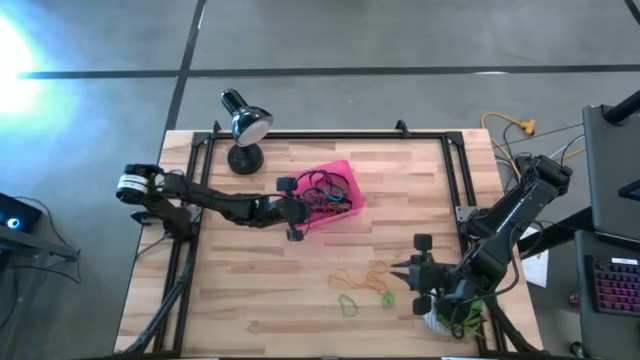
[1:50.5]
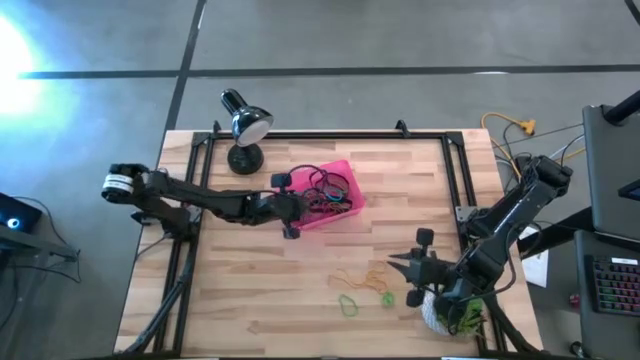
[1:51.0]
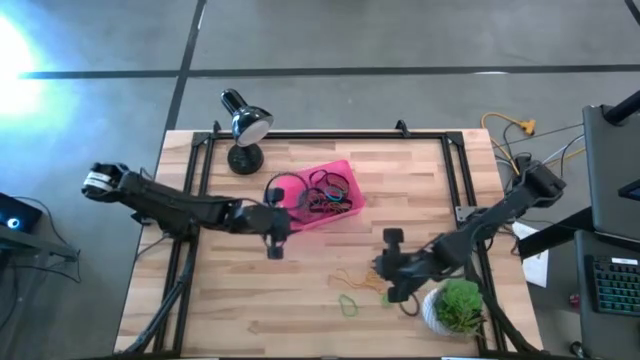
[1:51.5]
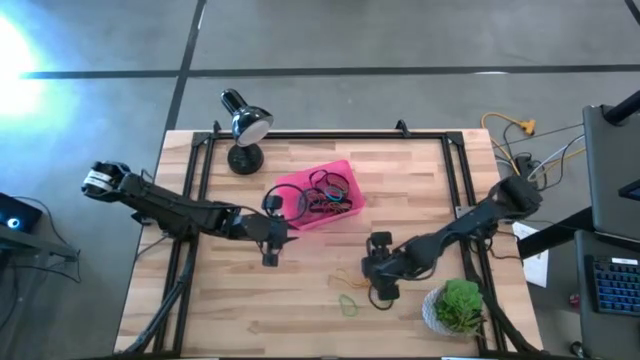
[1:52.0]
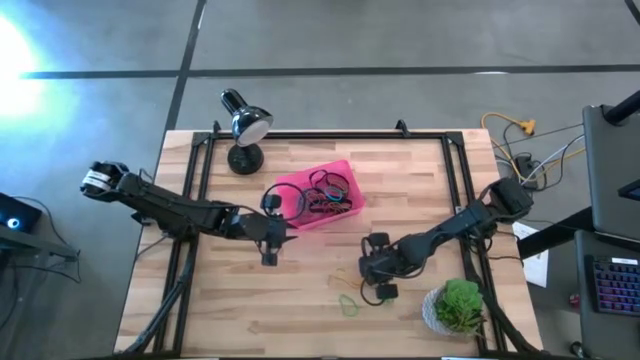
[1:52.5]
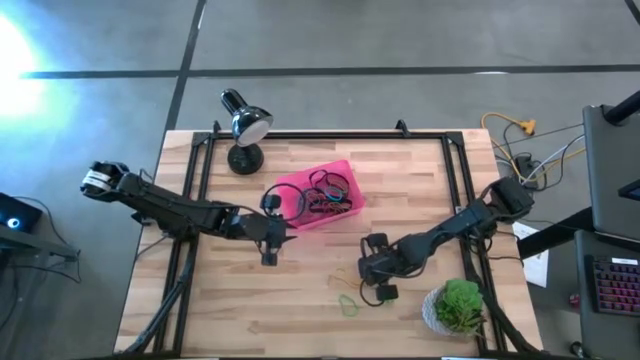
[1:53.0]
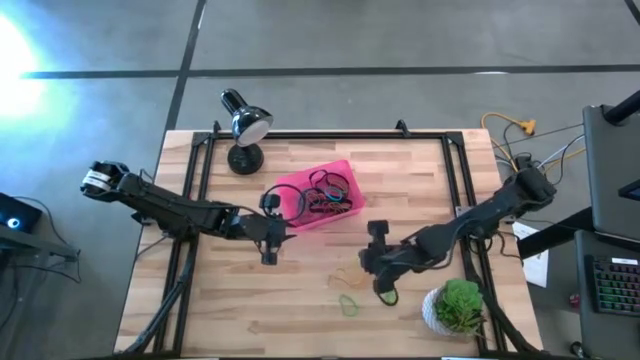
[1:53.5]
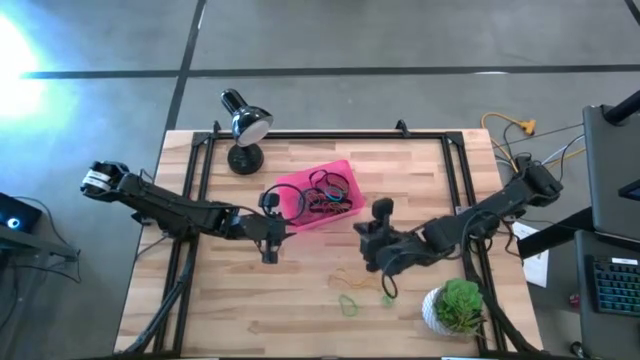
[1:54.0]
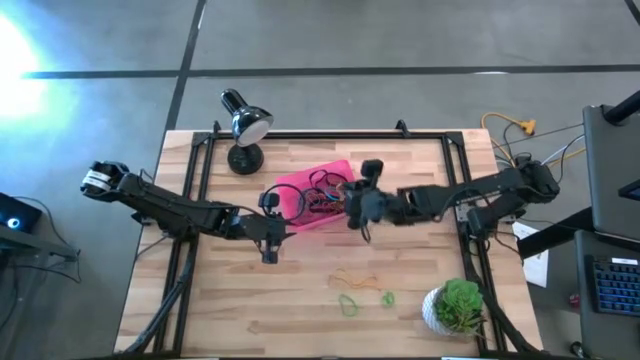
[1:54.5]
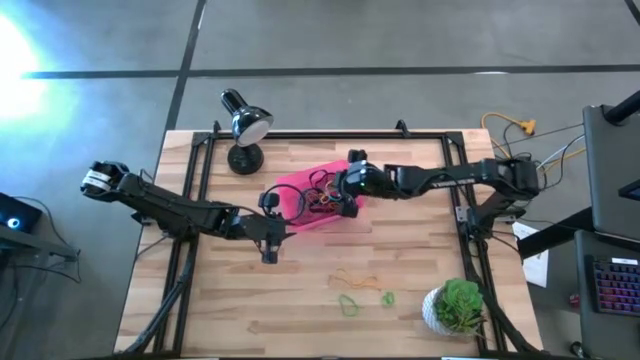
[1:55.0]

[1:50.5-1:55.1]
Task: Pick and place rubber bands into bin
Put the yellow rubber band into the red bin

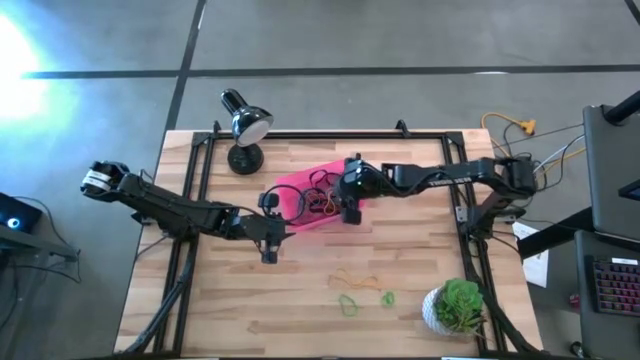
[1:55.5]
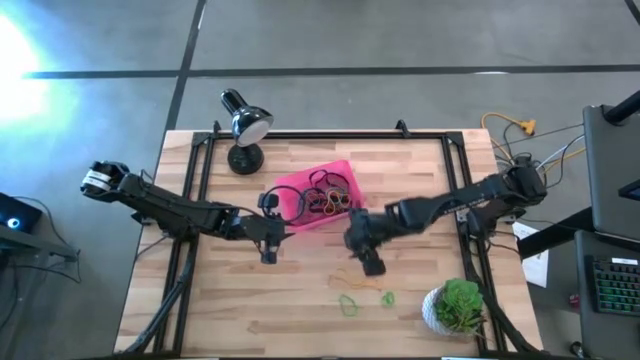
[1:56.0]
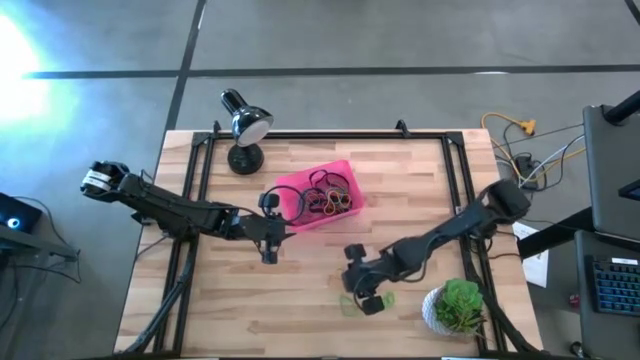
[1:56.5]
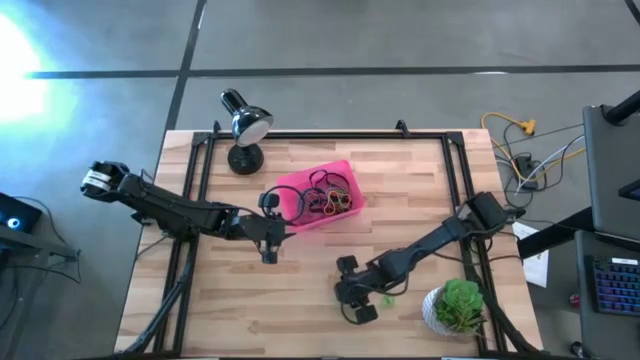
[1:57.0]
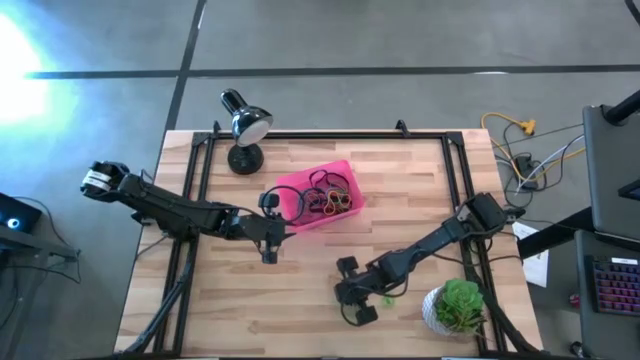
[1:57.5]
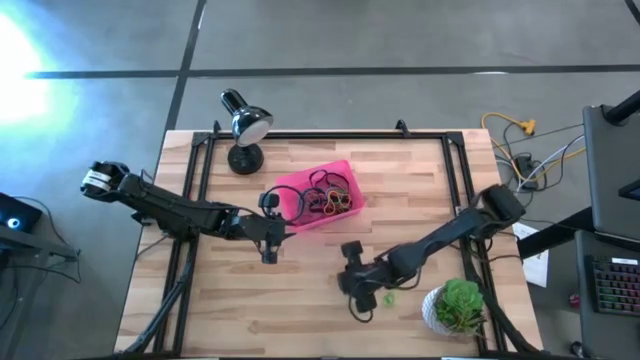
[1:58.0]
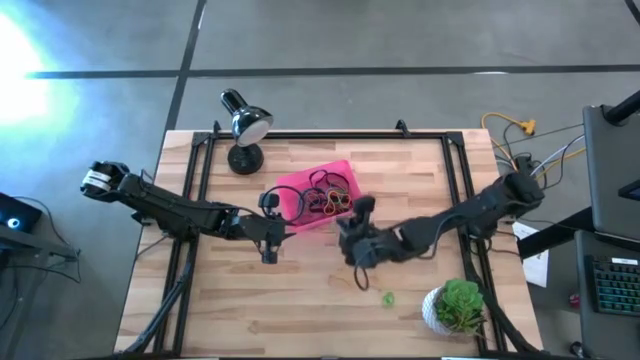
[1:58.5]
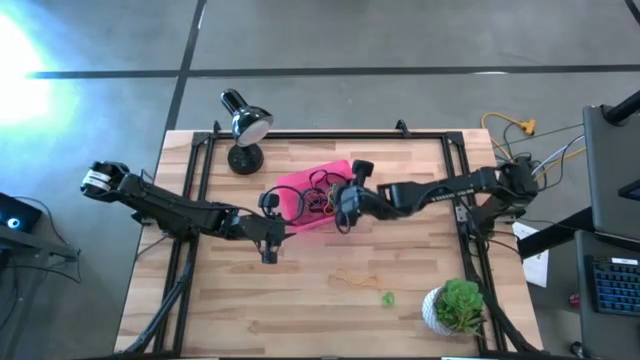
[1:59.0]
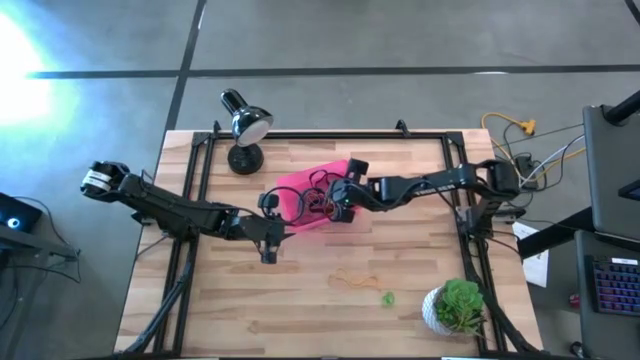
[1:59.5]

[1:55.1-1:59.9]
Put the green rubber band into the red bin

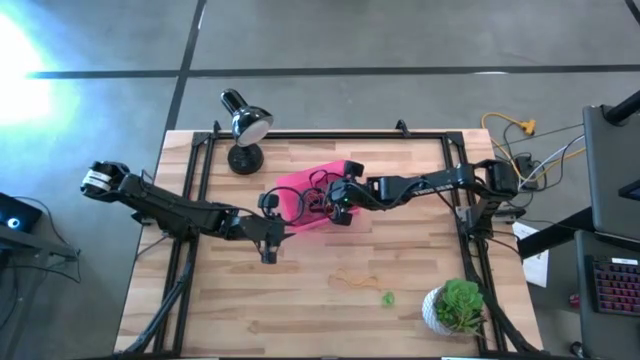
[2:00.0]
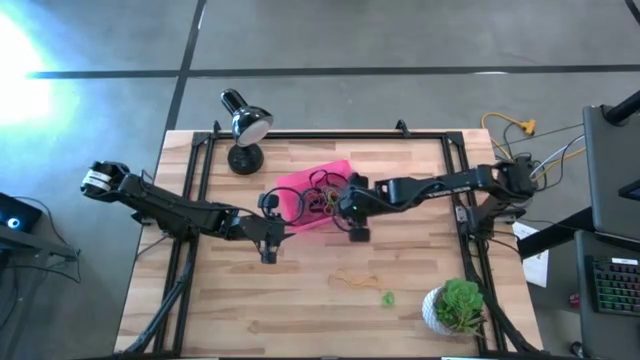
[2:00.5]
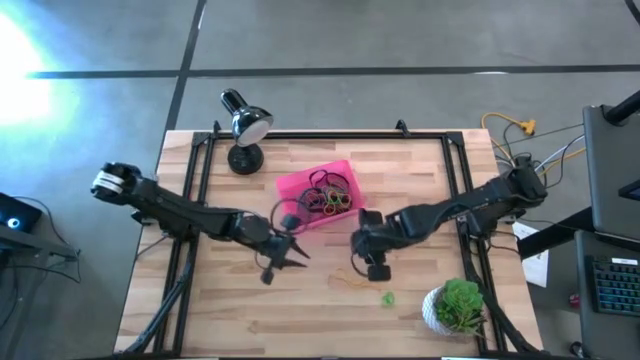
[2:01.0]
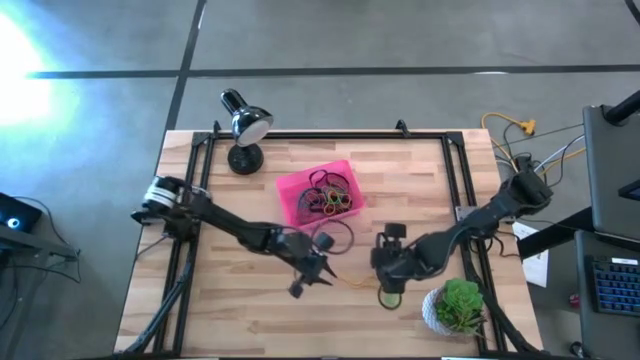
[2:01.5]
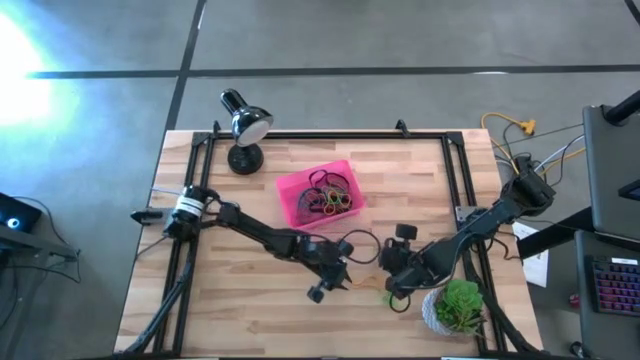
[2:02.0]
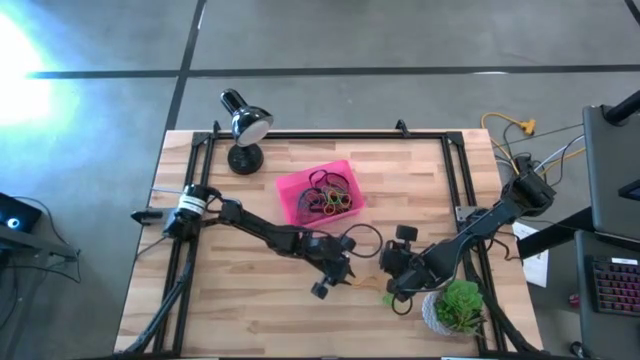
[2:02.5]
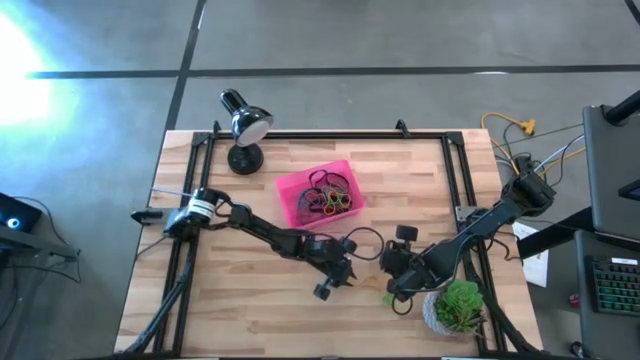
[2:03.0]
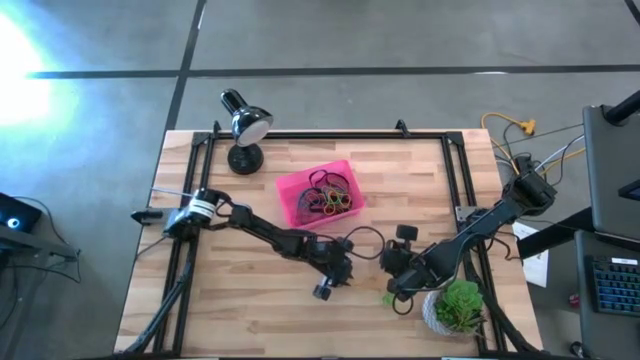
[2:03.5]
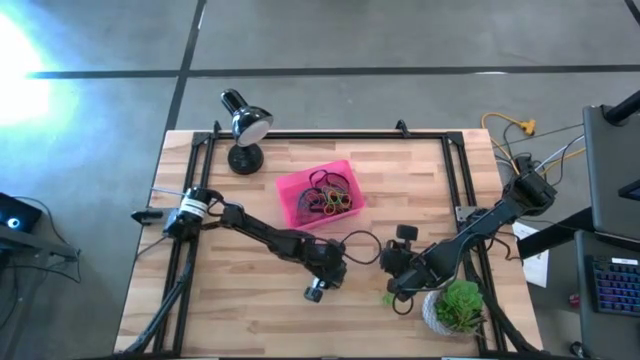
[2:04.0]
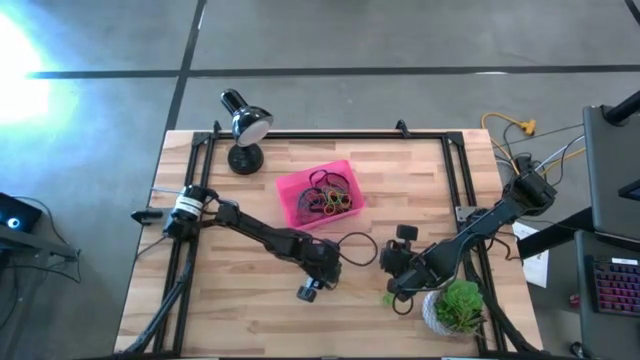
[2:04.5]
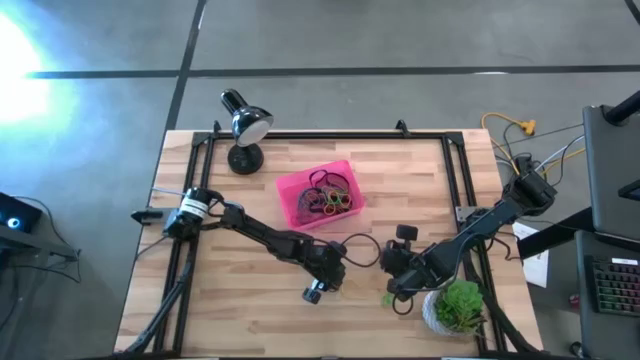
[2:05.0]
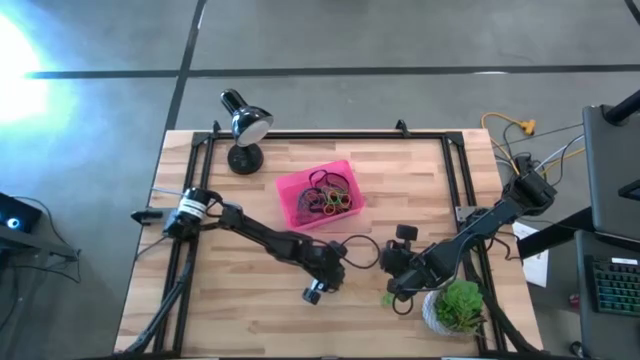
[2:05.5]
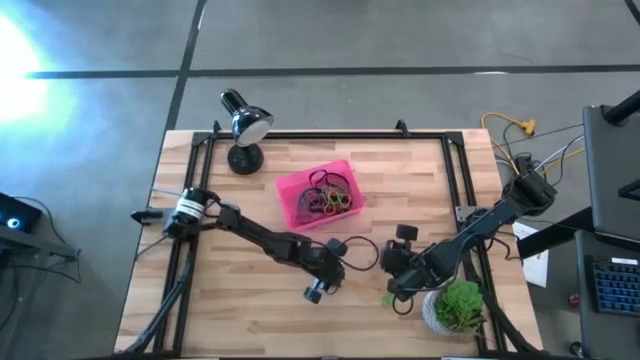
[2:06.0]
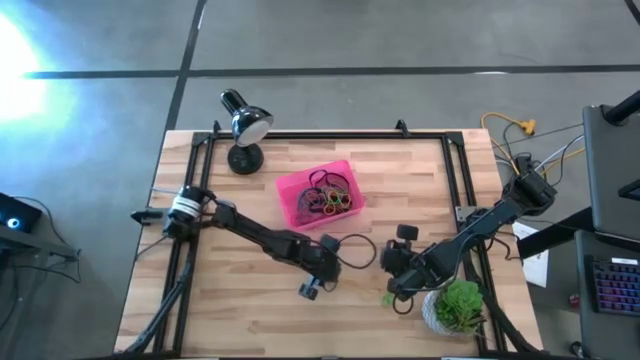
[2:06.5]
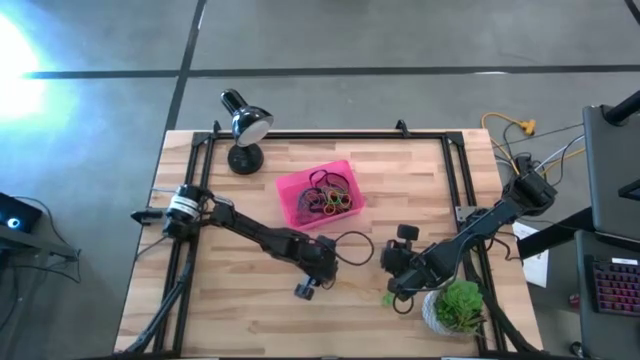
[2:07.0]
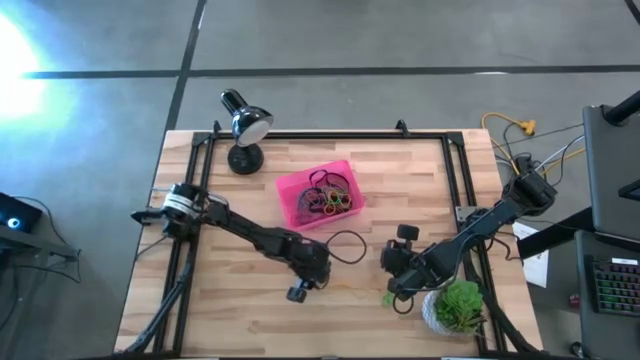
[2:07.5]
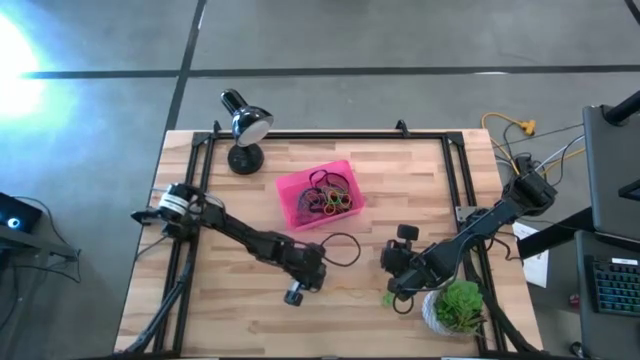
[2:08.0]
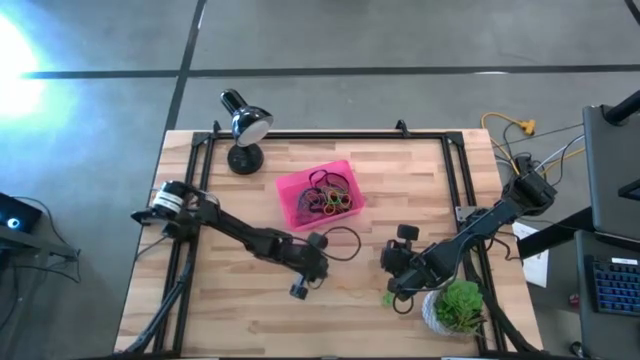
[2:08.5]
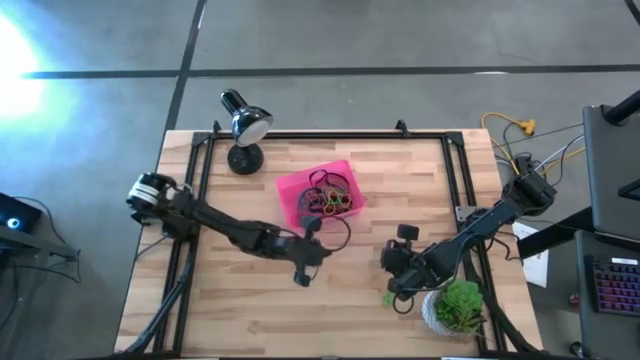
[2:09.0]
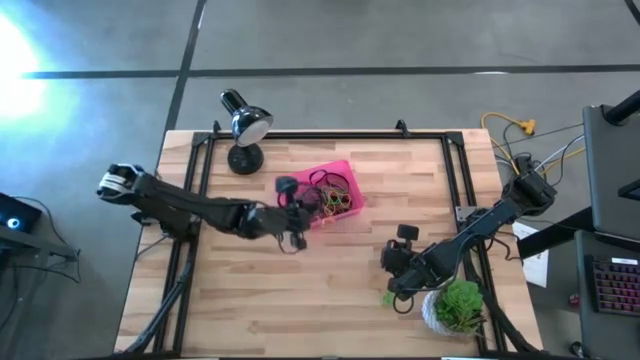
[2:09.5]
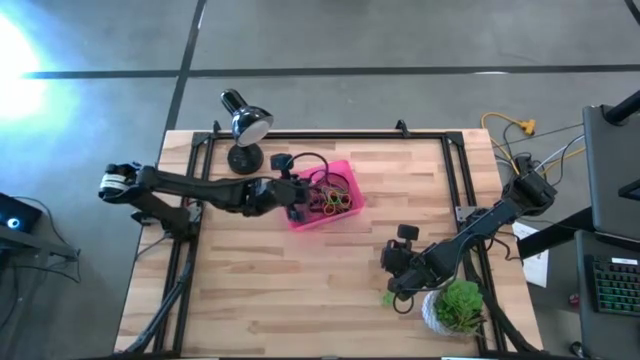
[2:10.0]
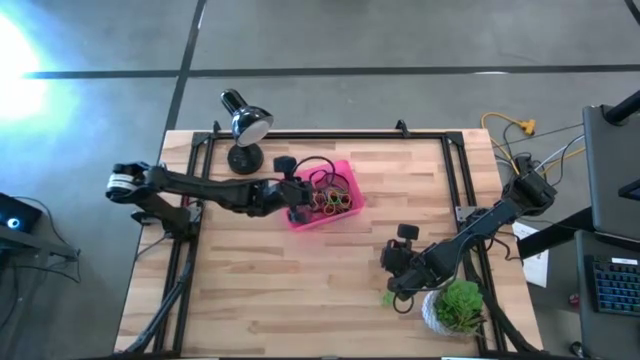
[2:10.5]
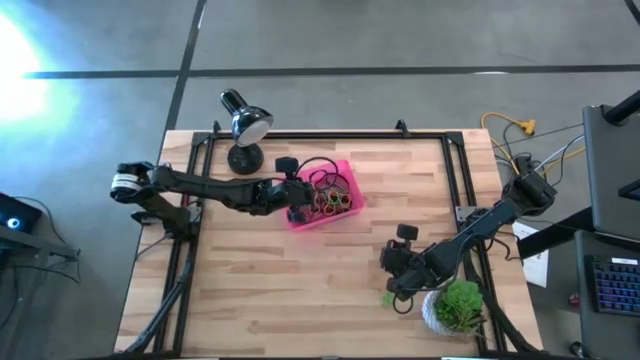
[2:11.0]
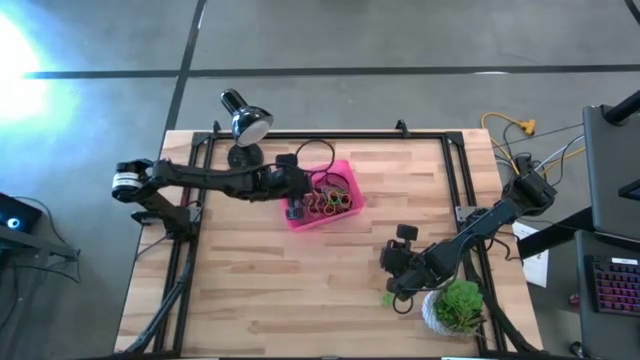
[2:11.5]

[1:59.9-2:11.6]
Put the yellow rubber band into the red bin
